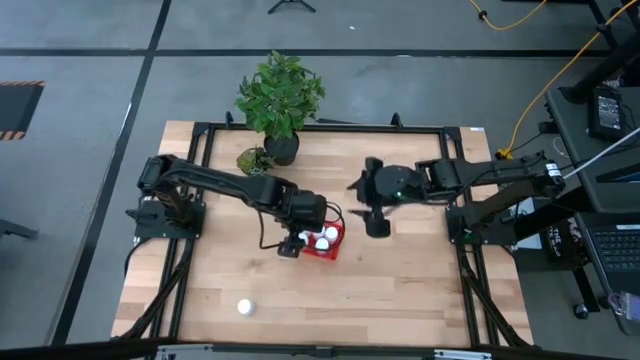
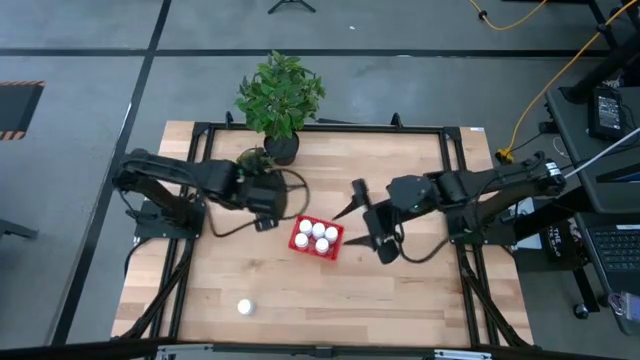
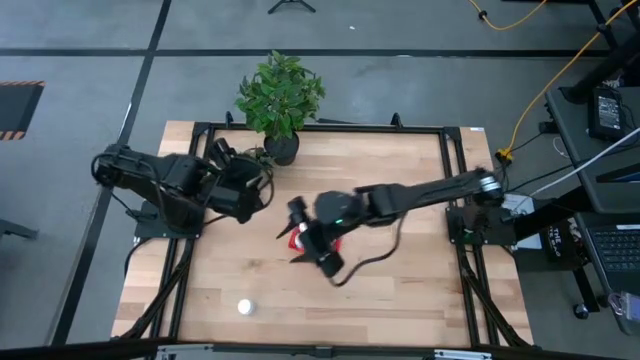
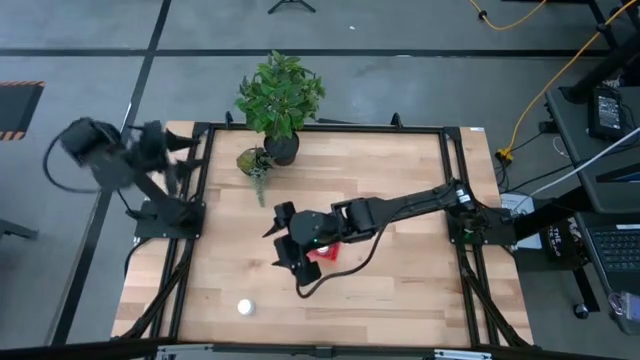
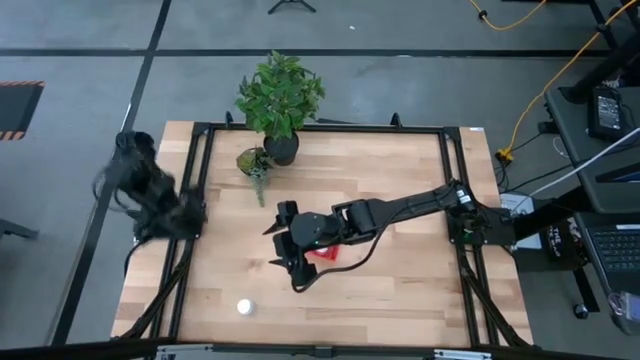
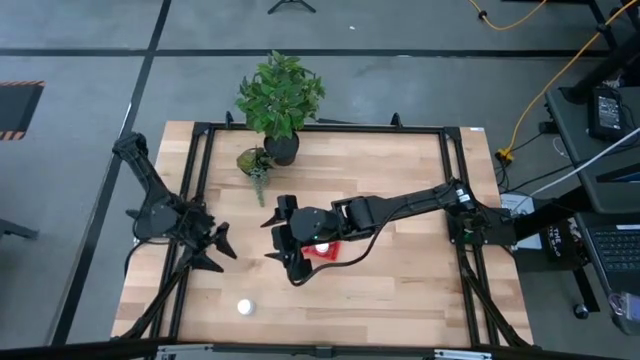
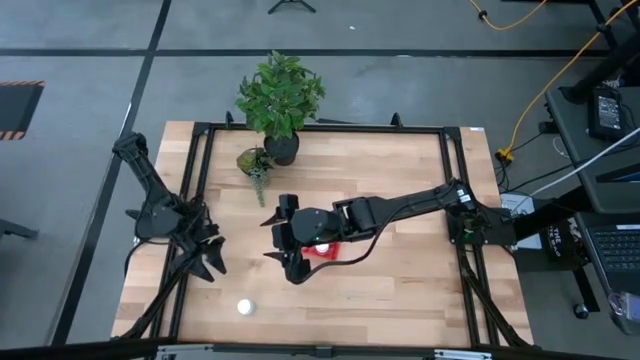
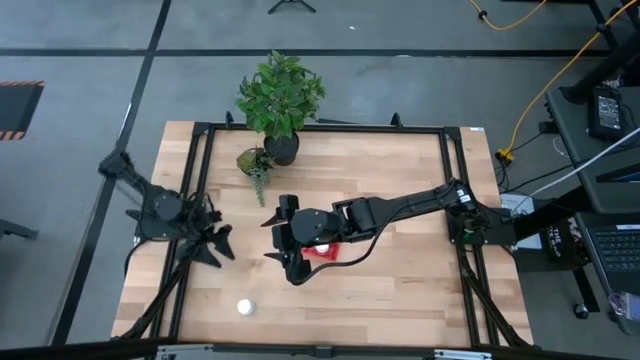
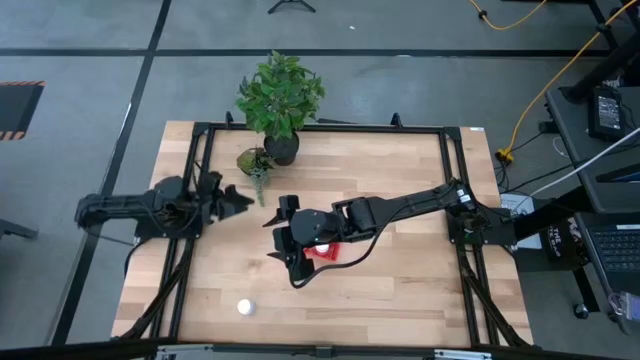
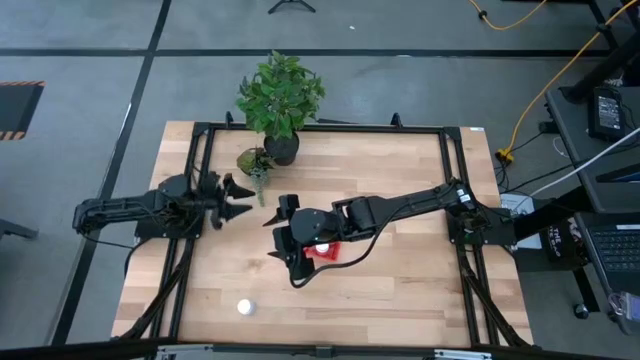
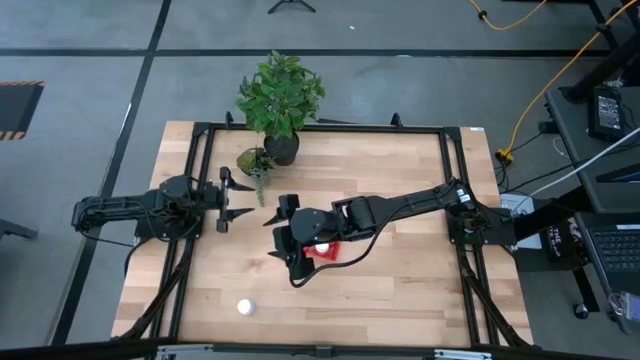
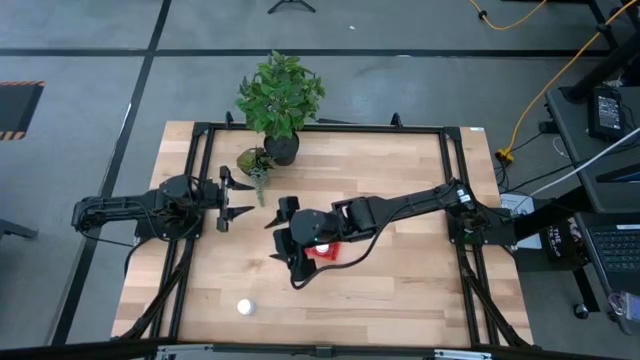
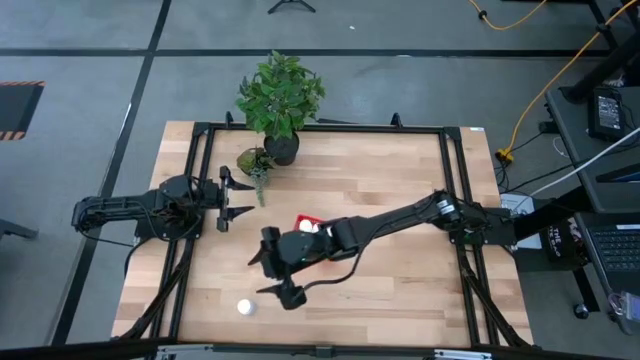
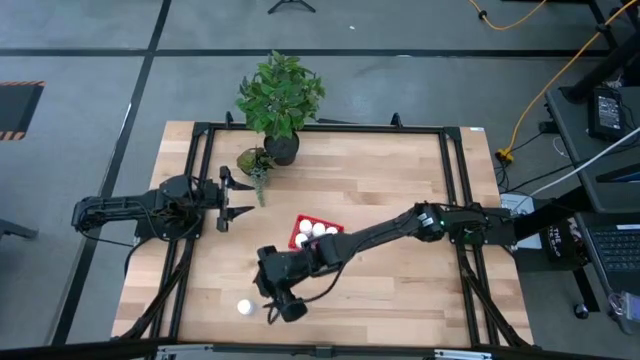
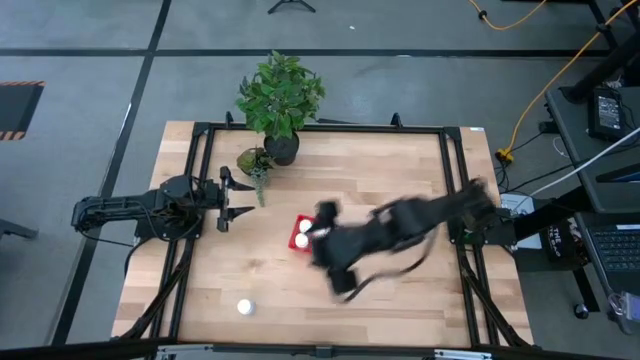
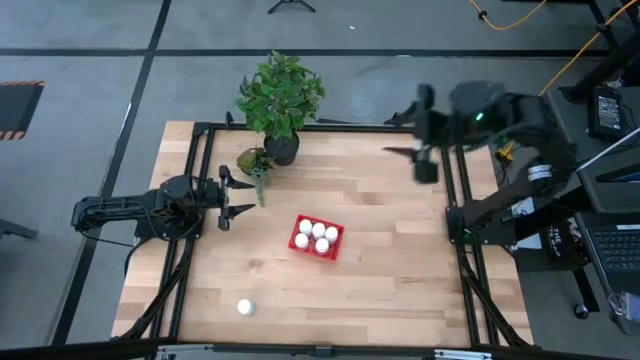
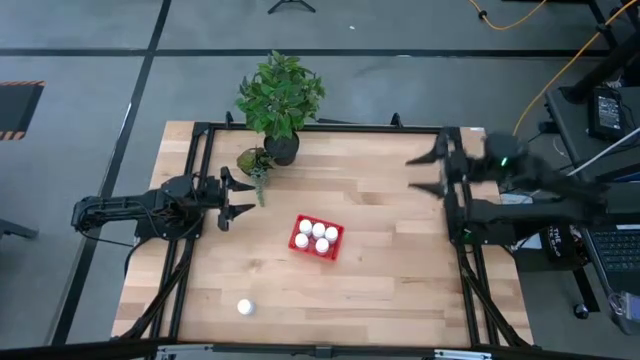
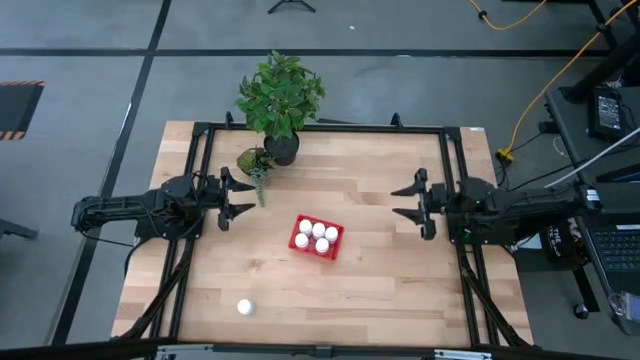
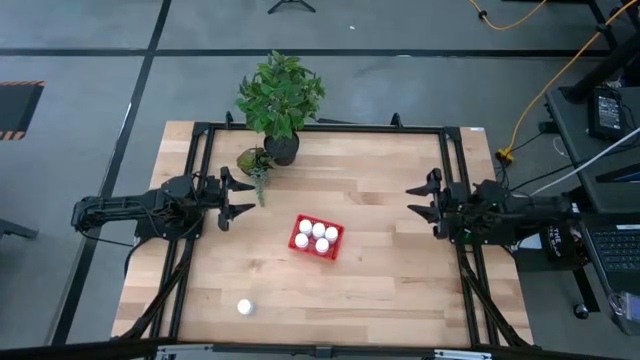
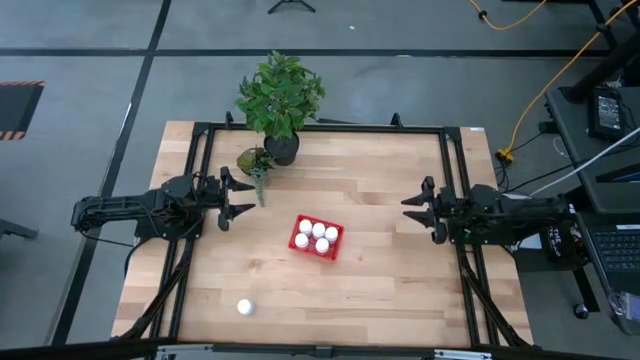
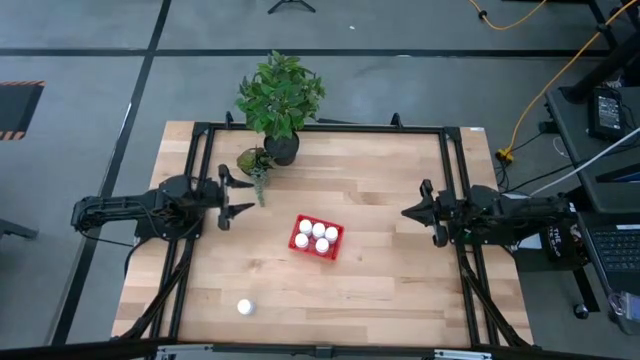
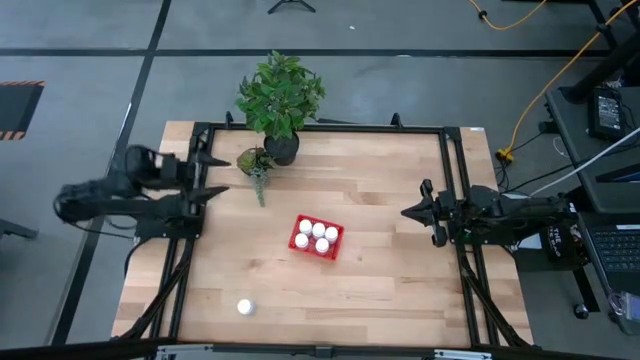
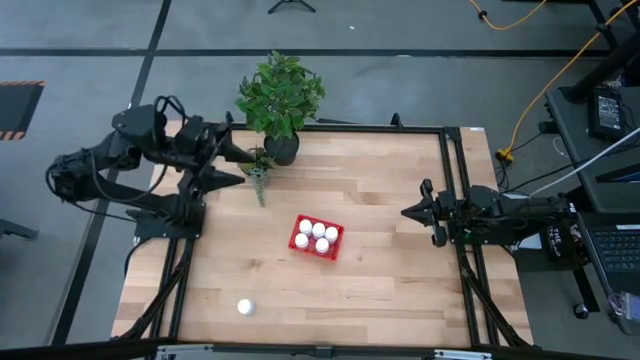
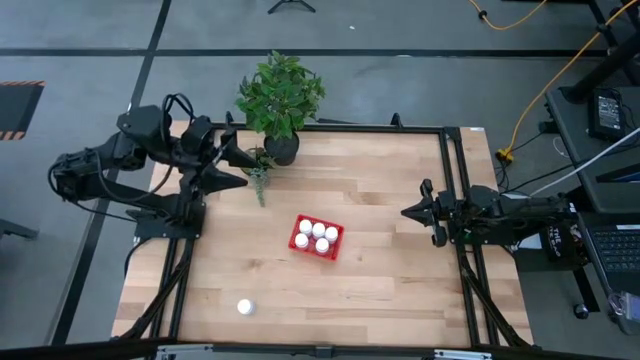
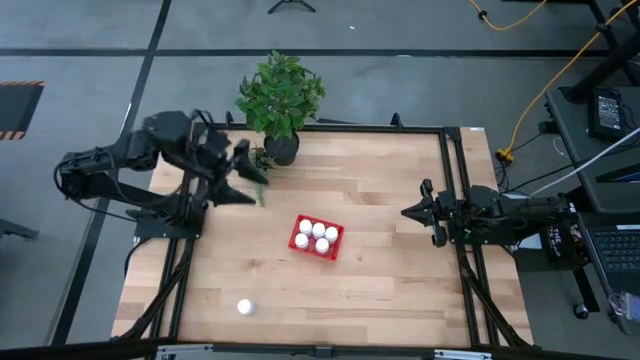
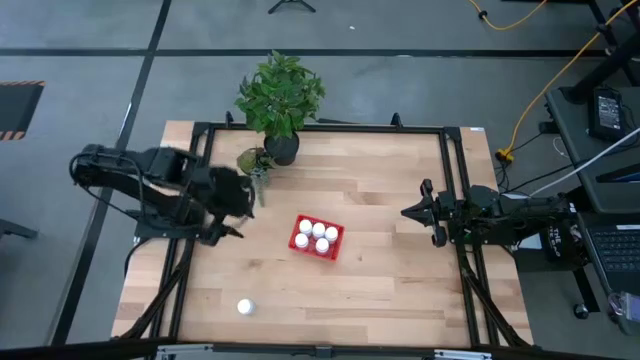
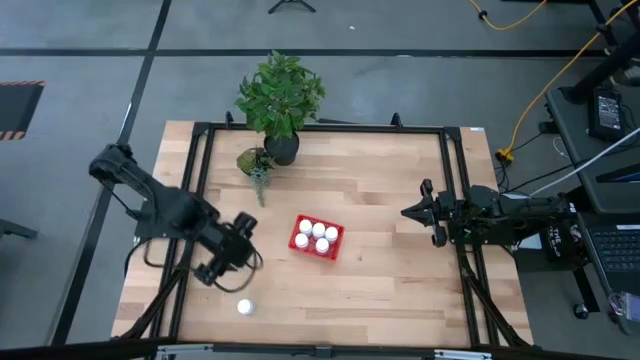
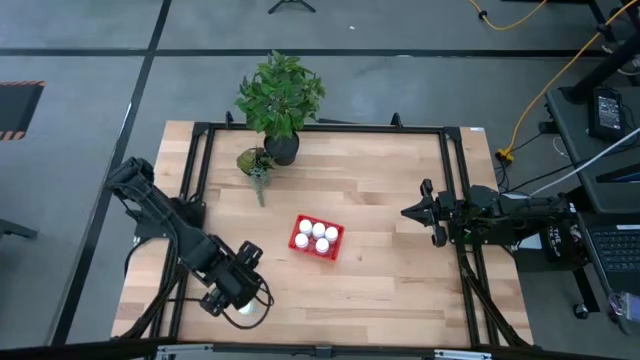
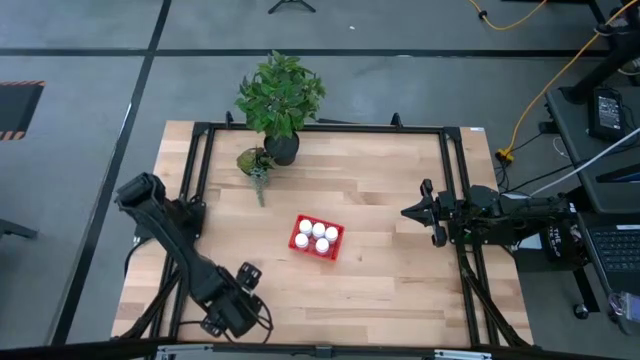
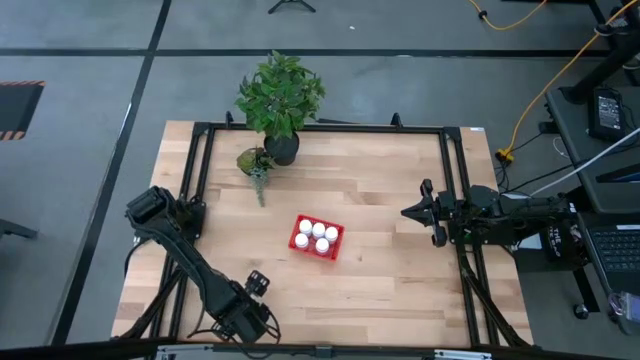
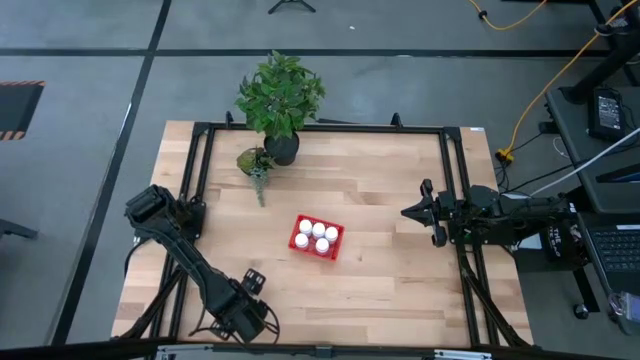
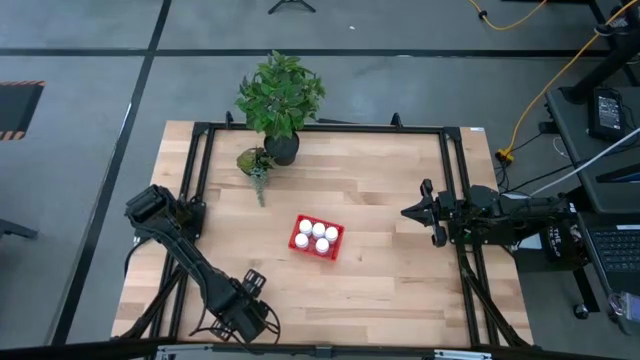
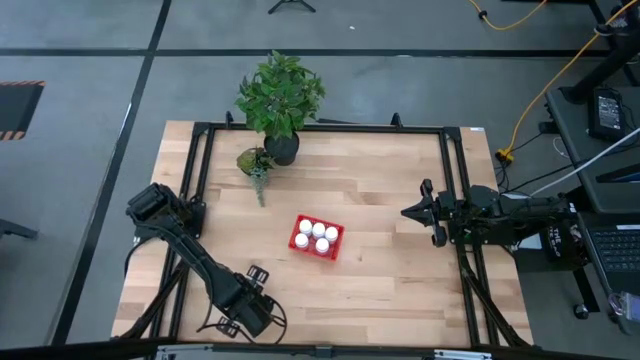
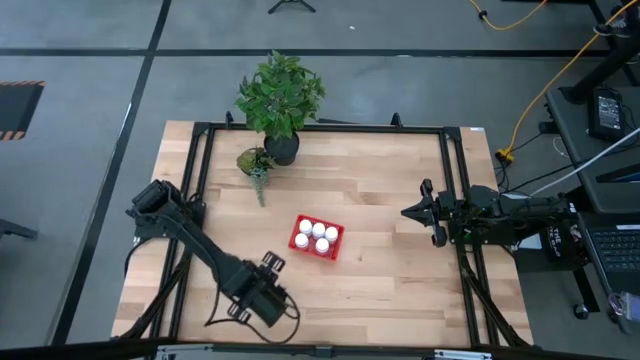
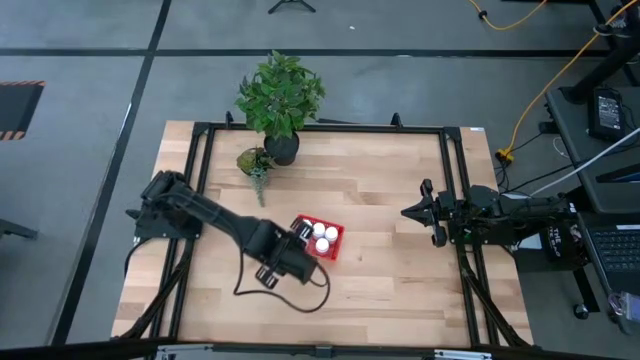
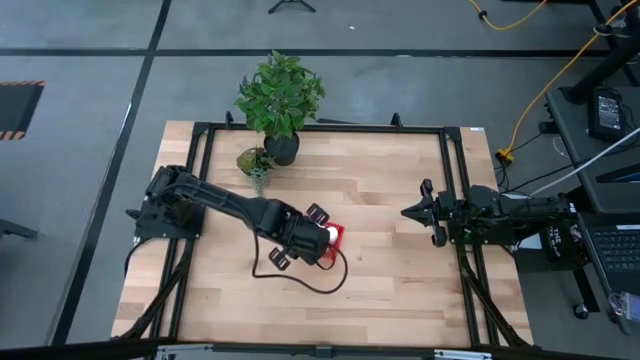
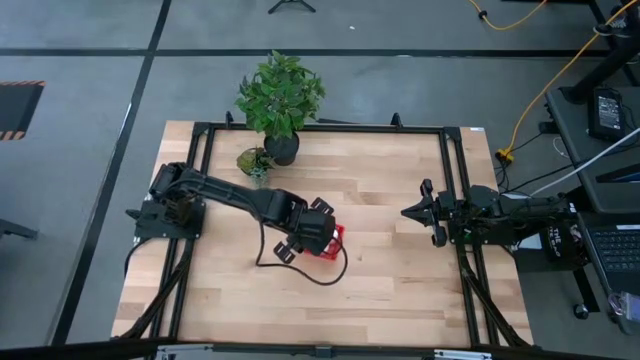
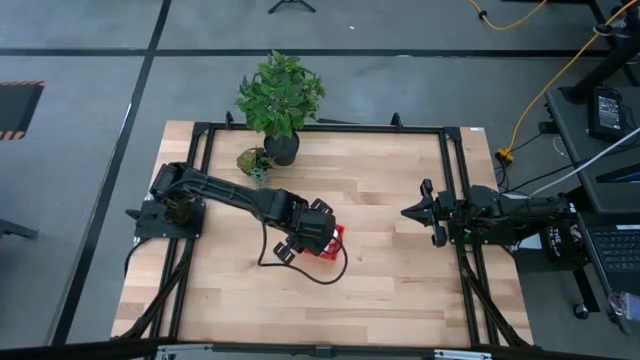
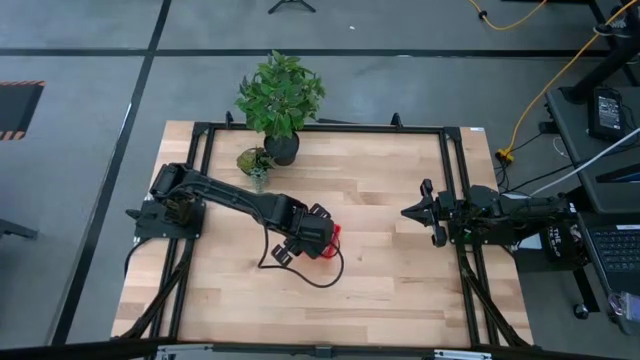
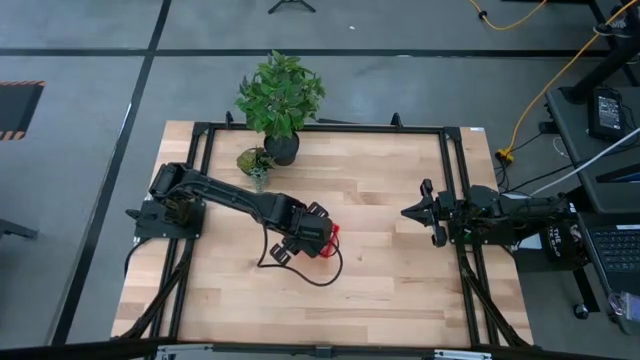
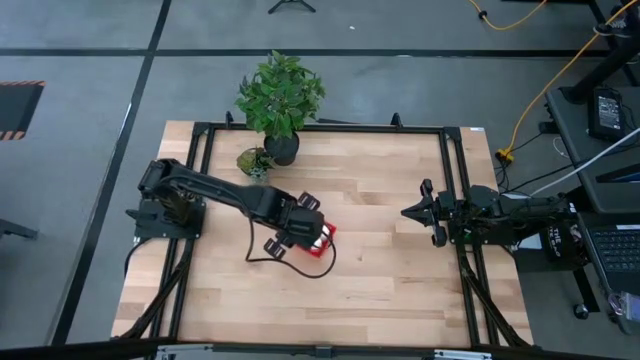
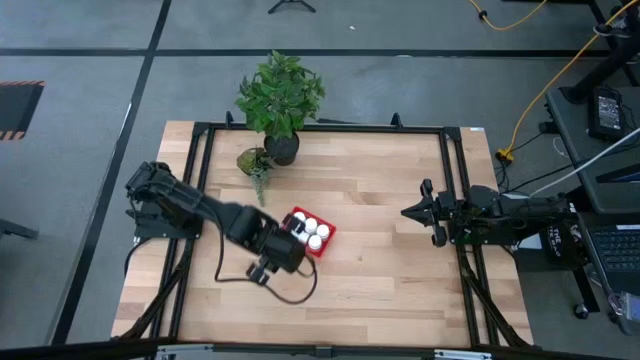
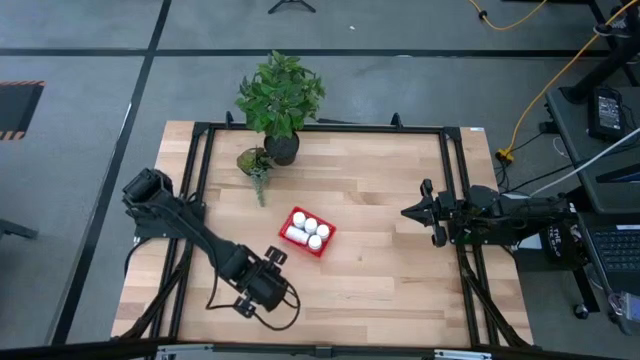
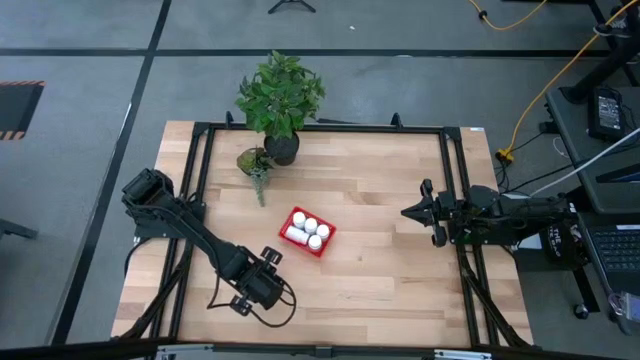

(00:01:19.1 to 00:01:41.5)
Task: Pick and place pill bottles into a basket
Put the white pill bottle into the bin
